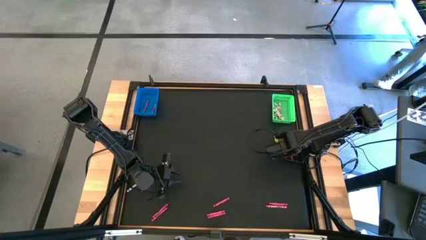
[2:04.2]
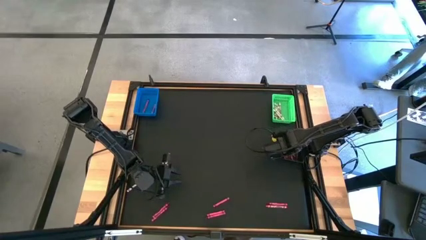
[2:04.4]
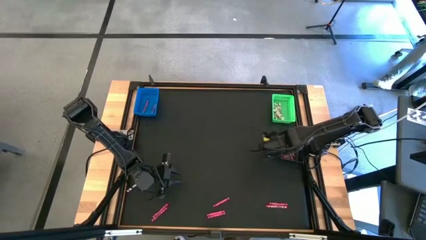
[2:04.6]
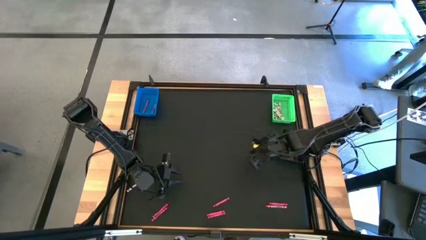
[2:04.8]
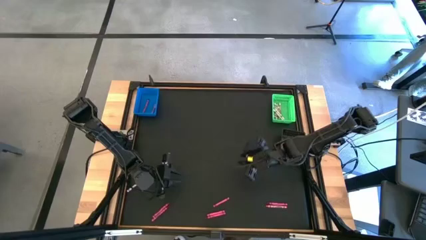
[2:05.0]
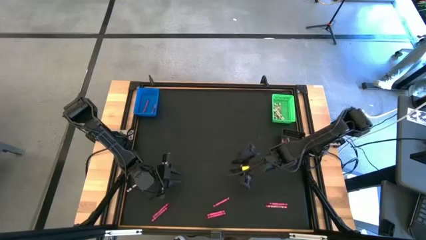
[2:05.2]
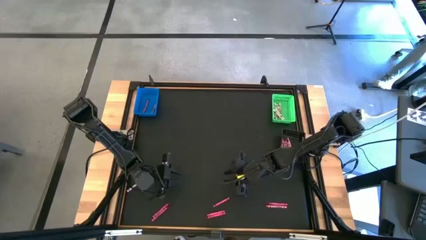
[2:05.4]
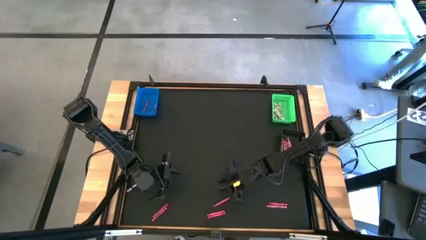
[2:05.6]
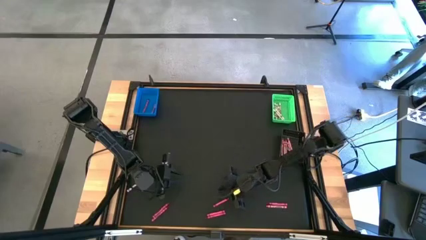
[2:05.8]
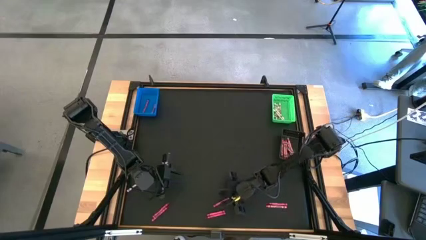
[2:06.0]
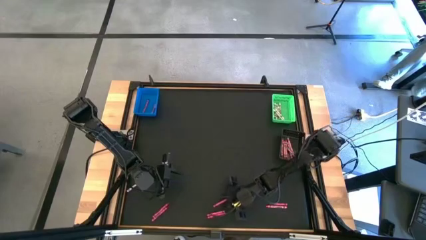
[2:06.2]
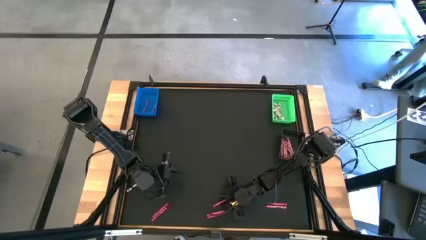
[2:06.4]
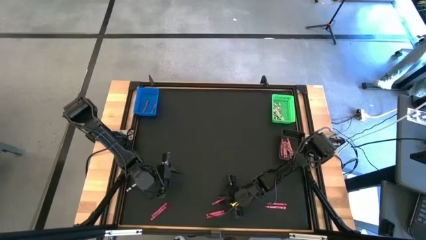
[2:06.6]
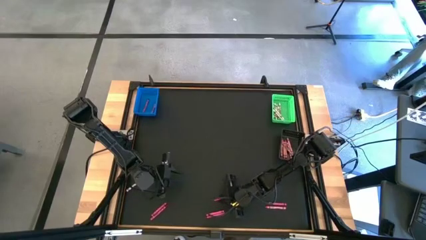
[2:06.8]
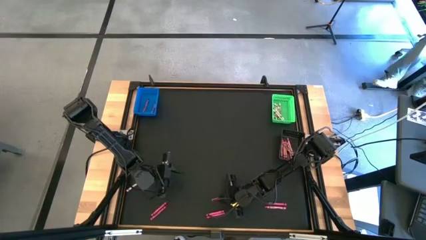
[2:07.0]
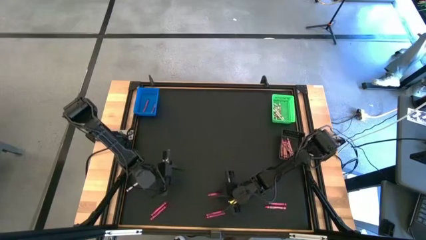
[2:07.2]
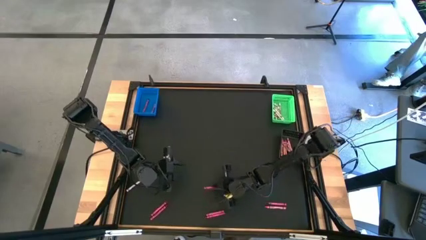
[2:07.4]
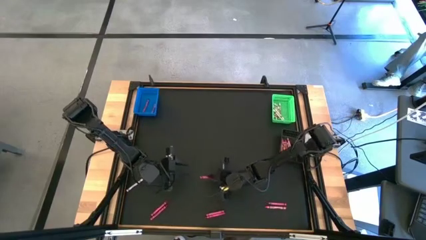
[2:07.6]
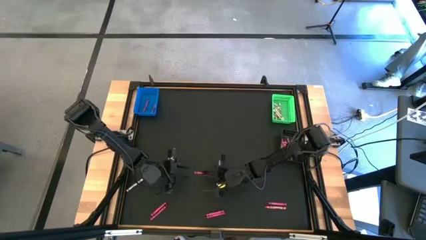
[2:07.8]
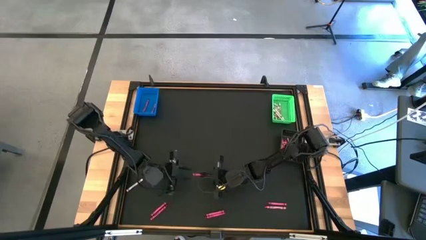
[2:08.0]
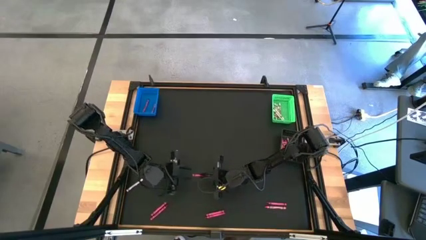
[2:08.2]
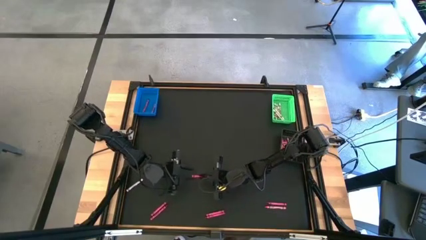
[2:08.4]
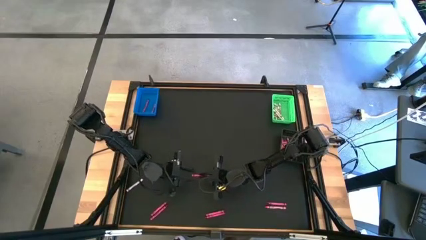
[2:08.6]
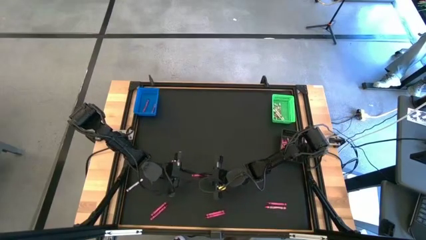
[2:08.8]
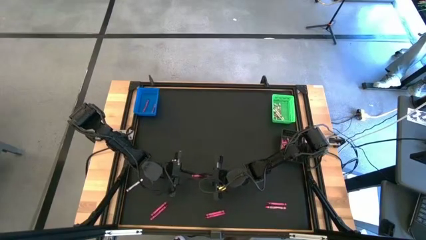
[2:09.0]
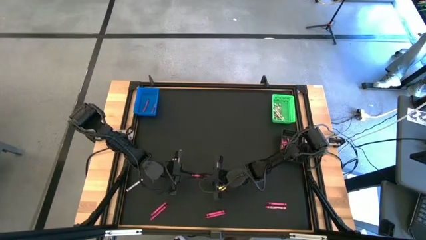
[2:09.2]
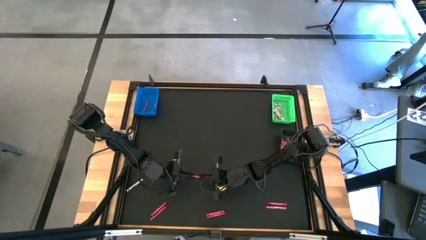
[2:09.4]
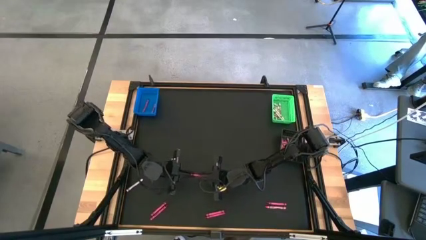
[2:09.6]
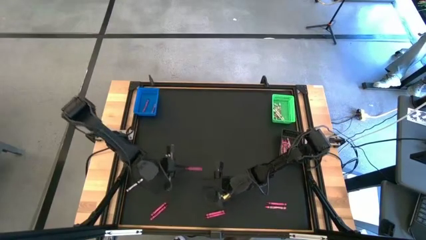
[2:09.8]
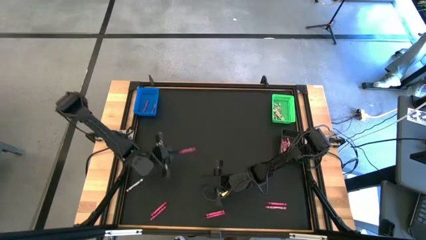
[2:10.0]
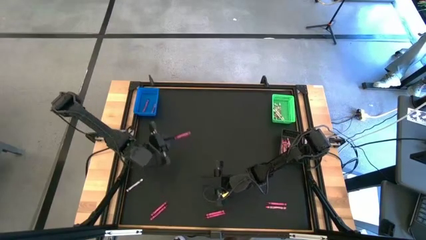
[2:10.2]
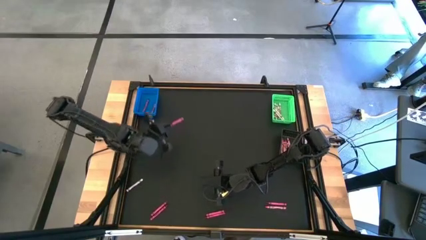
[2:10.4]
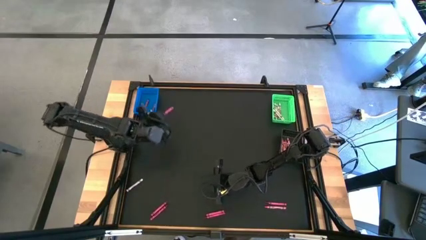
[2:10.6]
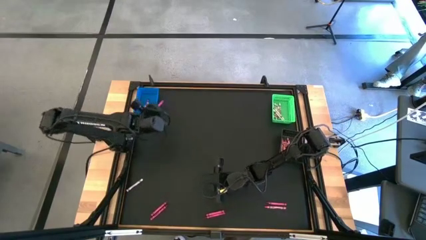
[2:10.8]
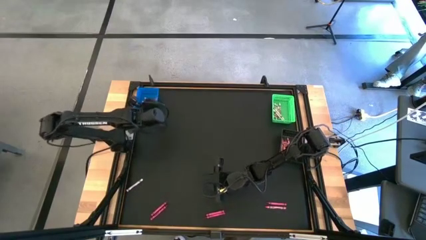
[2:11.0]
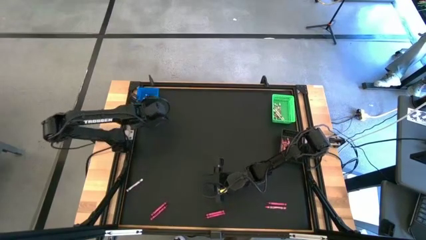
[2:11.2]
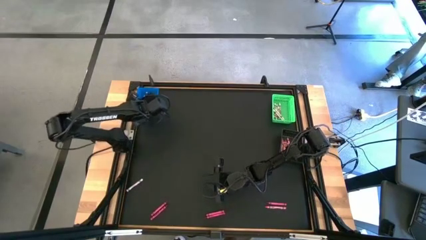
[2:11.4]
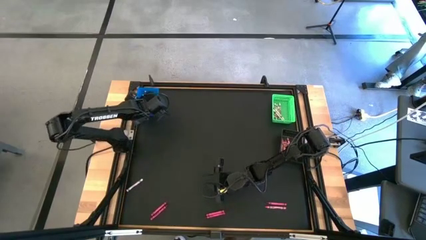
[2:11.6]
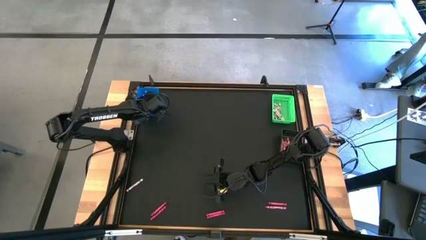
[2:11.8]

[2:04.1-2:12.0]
Task: Sort crayons
Put the red crayon into the blue bin

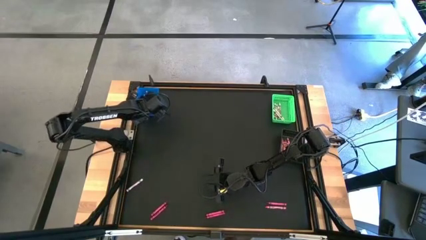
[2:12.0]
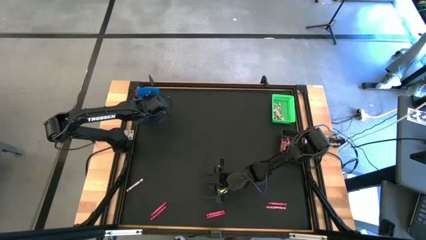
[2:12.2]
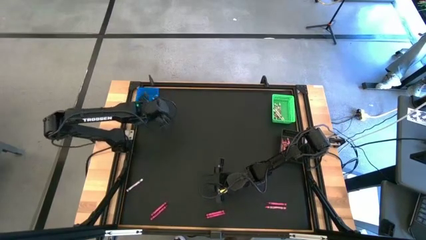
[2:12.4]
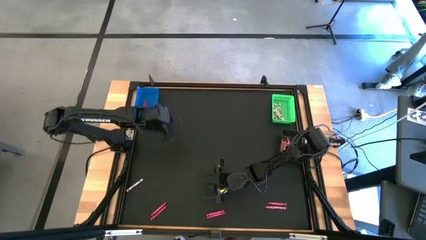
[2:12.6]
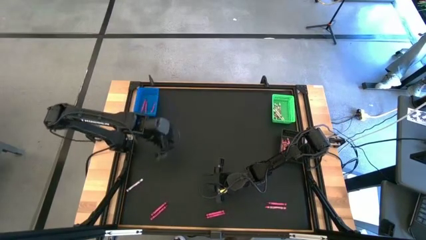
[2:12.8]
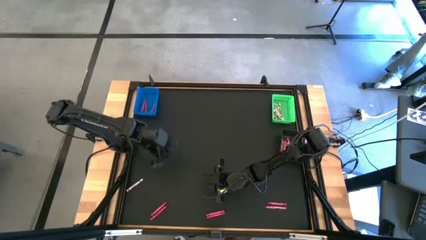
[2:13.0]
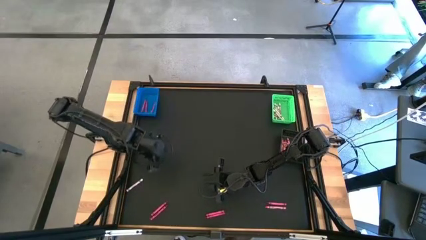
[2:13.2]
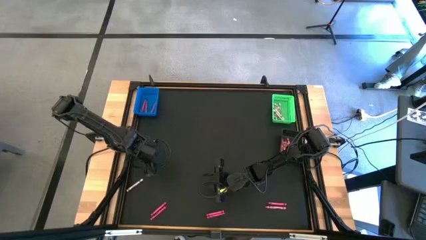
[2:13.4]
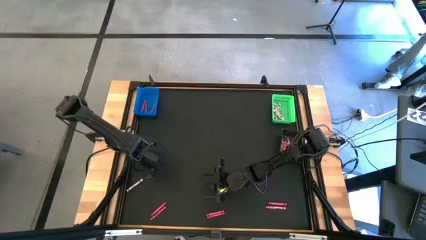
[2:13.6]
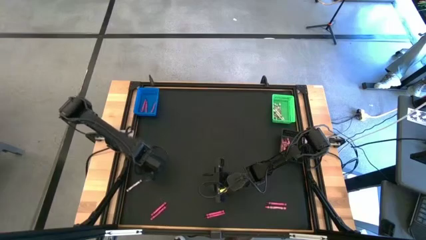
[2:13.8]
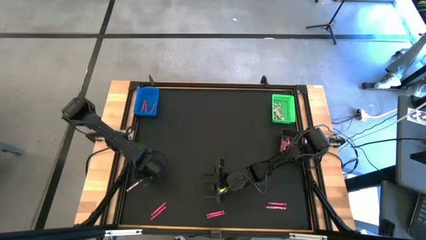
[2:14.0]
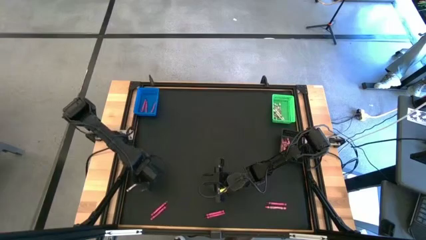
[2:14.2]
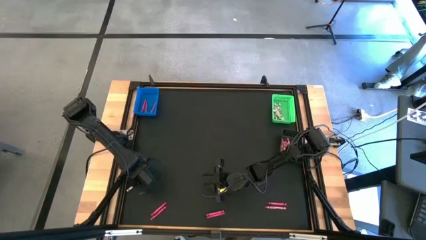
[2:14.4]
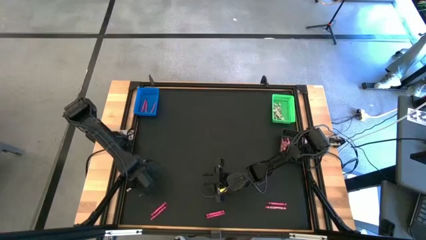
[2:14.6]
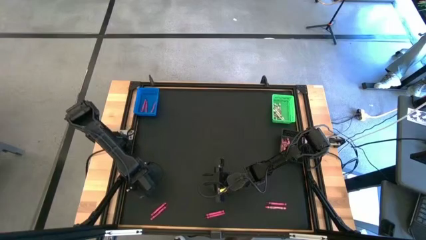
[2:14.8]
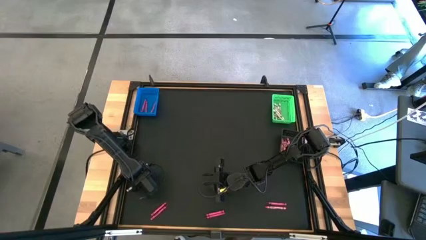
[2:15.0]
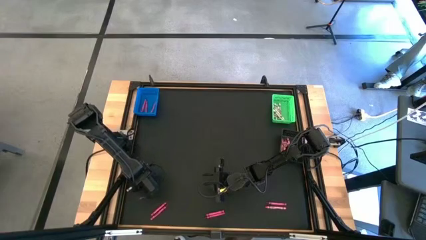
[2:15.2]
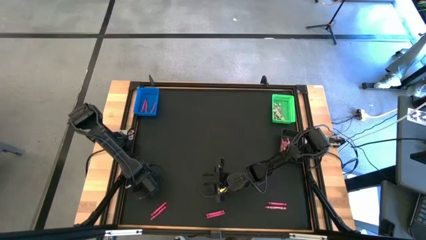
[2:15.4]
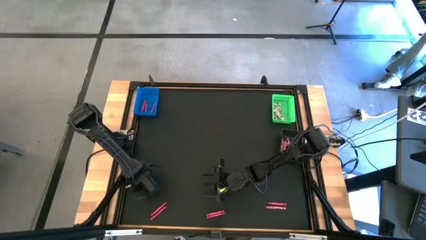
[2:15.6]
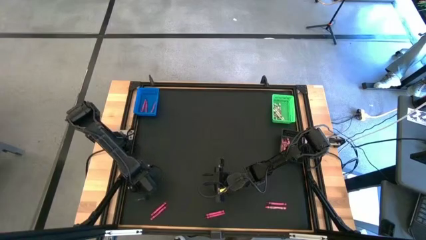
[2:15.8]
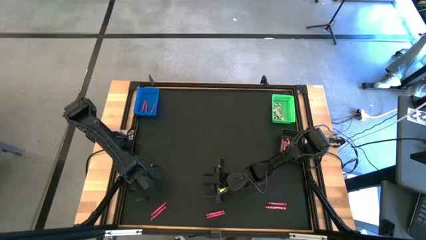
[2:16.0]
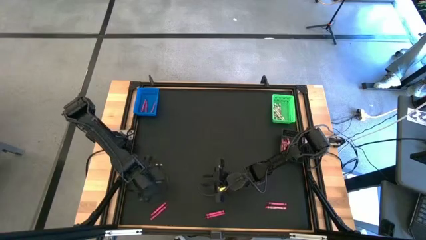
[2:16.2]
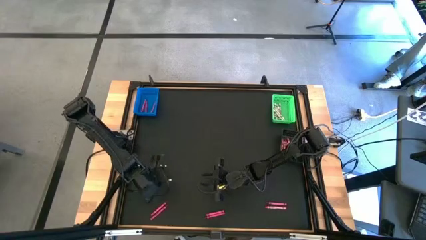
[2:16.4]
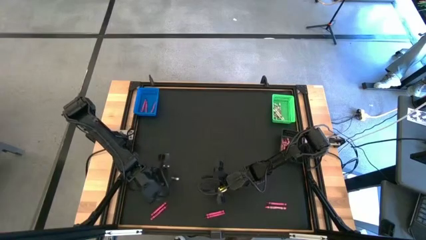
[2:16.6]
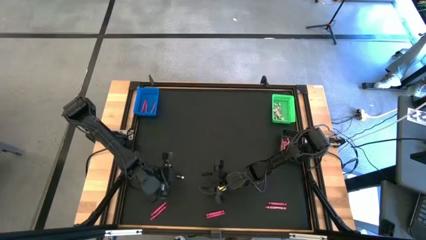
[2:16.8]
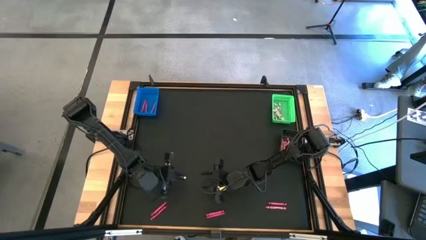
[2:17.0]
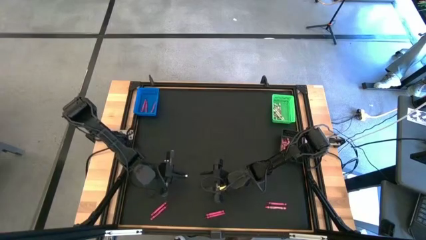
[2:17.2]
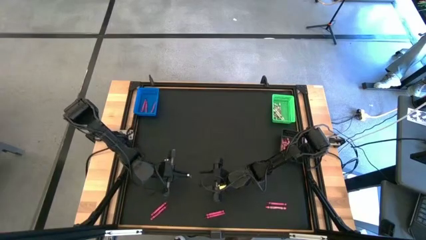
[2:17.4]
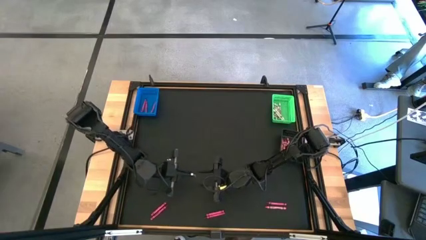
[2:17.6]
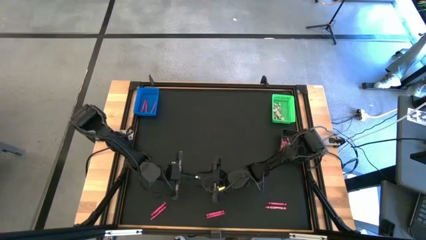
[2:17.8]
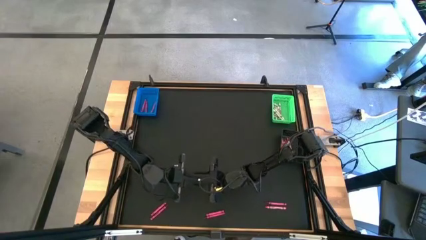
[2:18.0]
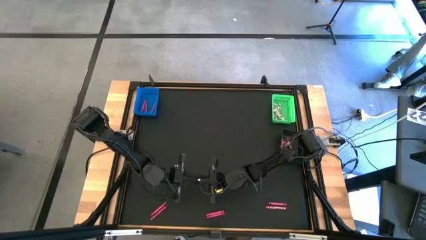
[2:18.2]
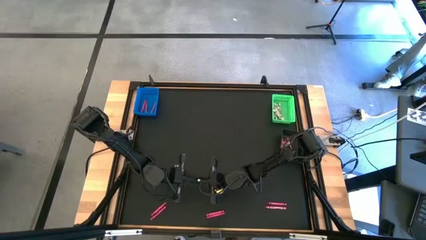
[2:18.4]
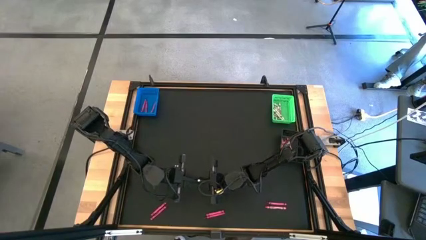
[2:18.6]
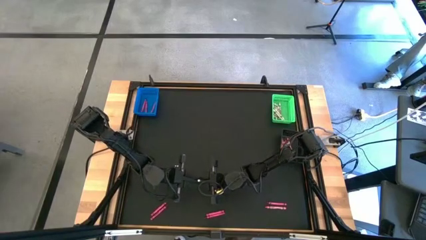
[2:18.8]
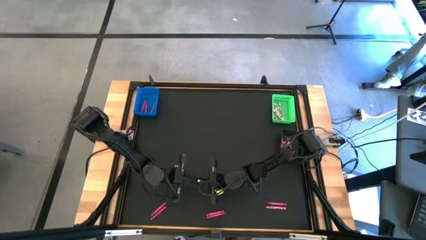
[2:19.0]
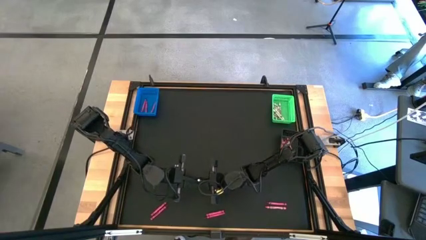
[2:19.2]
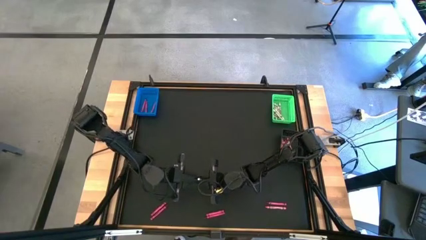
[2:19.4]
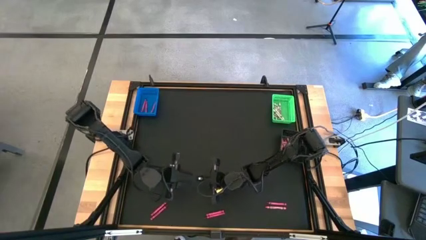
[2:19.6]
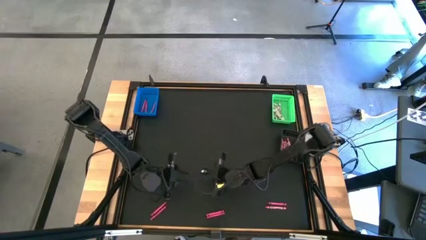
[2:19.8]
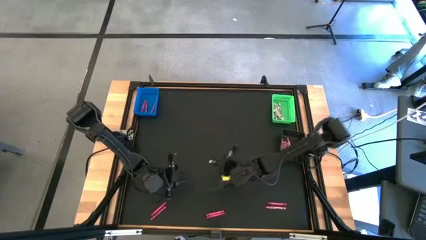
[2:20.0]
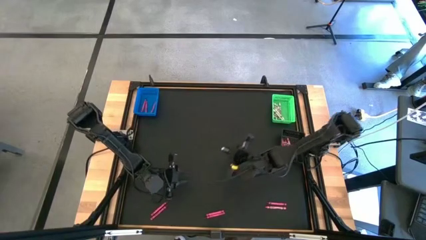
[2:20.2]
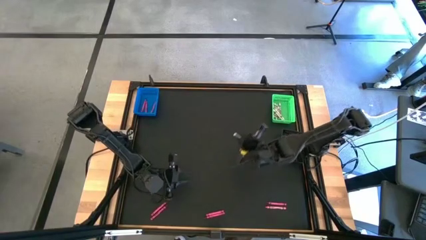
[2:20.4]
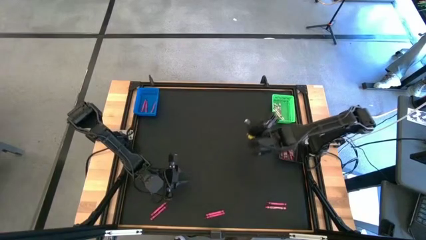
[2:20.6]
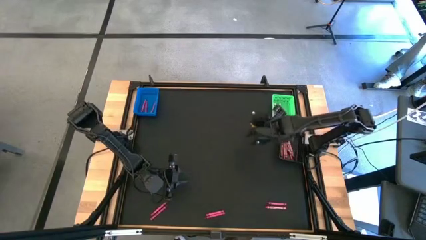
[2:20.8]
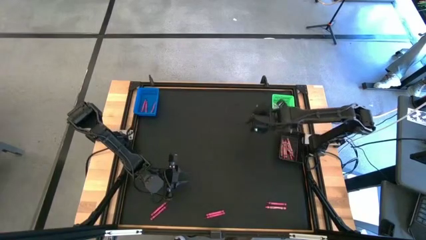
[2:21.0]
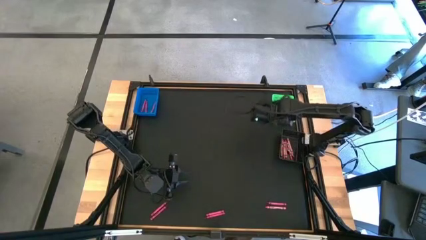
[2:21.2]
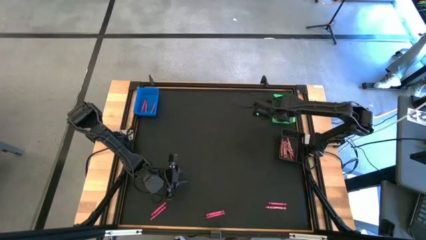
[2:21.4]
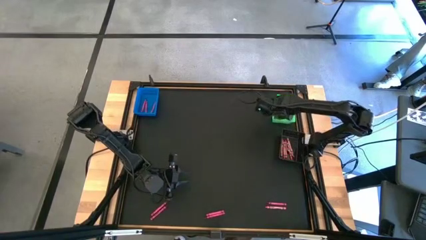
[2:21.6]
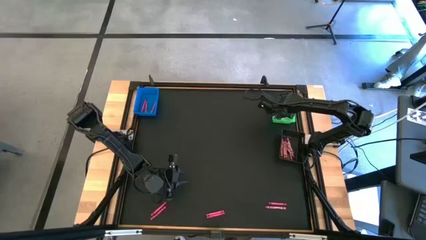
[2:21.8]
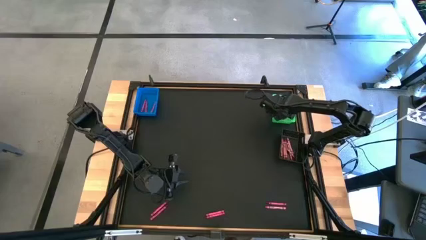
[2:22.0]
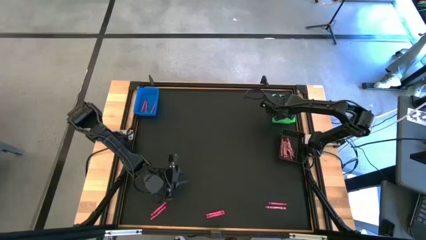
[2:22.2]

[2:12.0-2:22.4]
Put the white crayon into the green bin
